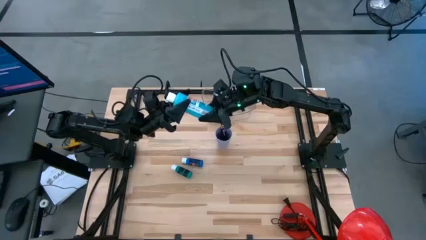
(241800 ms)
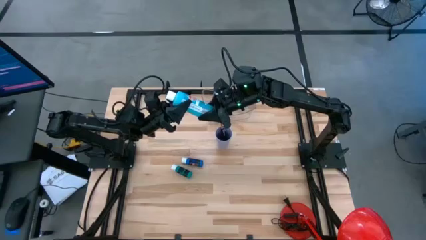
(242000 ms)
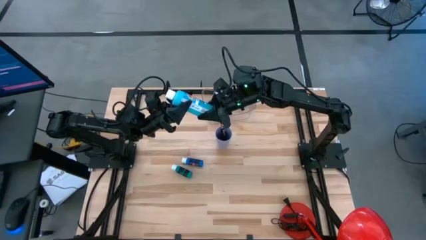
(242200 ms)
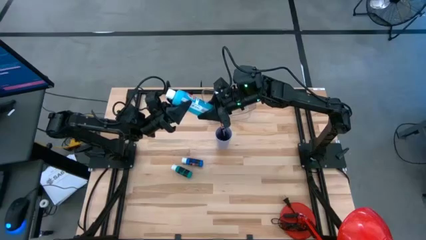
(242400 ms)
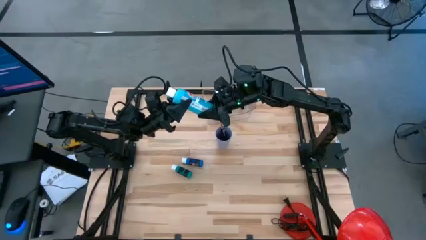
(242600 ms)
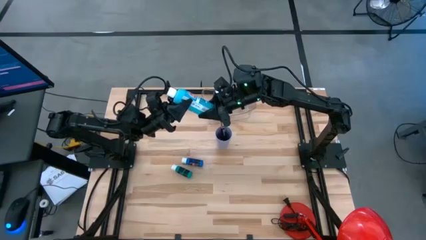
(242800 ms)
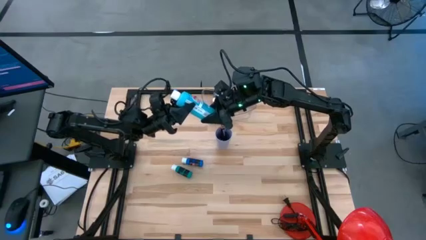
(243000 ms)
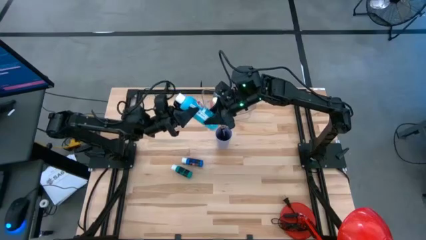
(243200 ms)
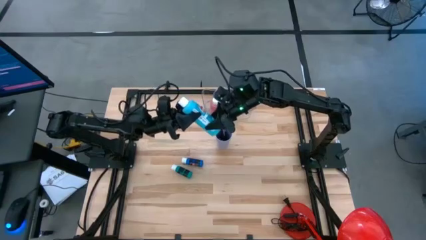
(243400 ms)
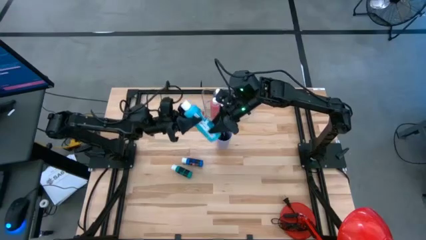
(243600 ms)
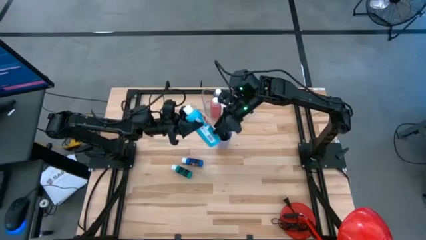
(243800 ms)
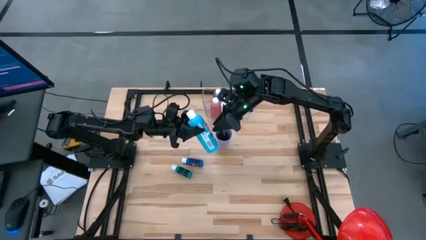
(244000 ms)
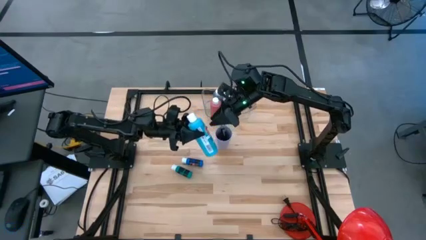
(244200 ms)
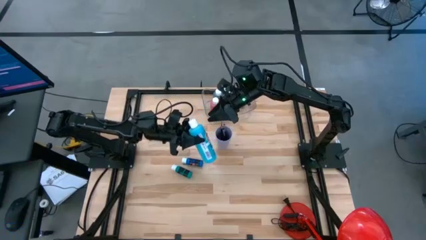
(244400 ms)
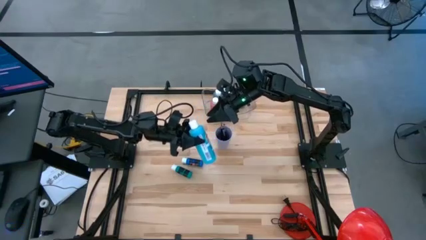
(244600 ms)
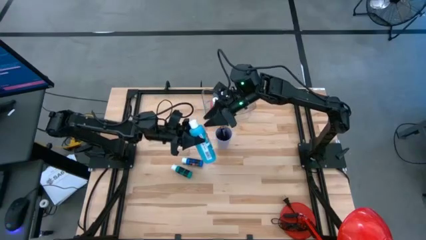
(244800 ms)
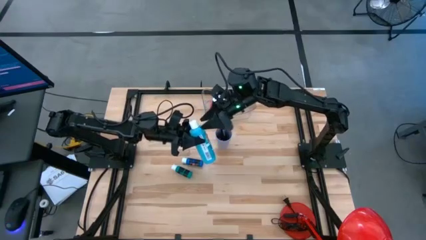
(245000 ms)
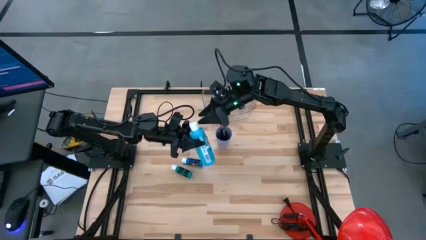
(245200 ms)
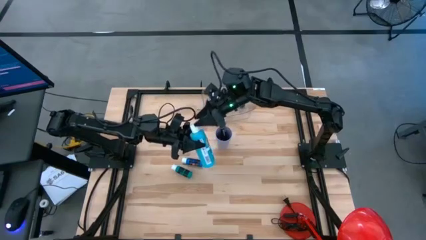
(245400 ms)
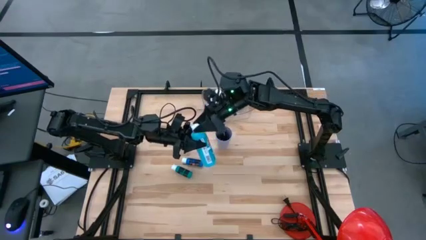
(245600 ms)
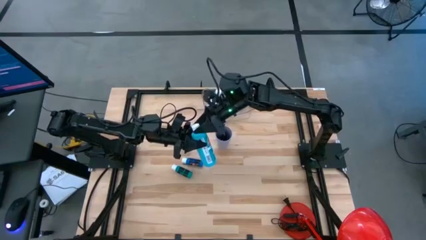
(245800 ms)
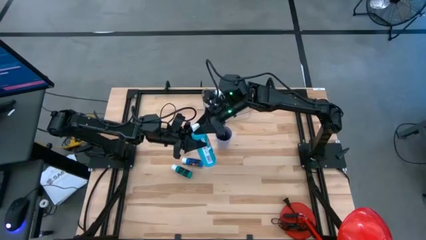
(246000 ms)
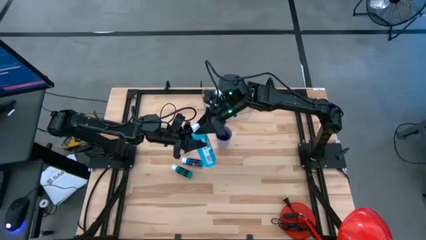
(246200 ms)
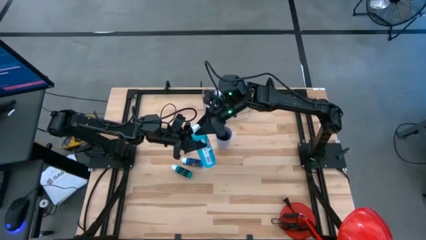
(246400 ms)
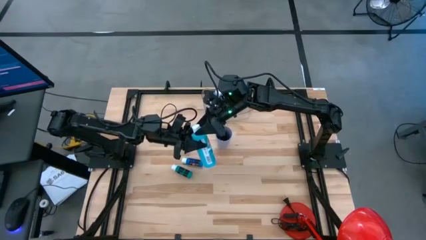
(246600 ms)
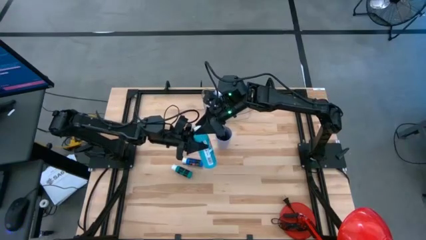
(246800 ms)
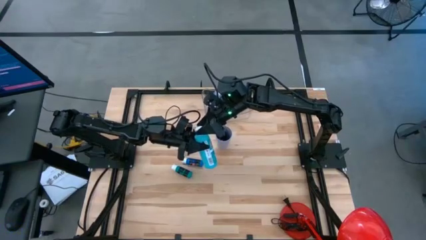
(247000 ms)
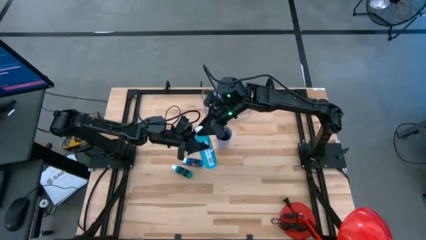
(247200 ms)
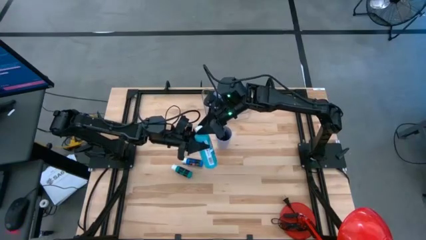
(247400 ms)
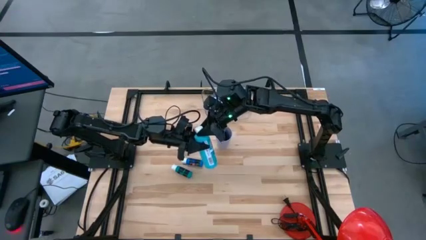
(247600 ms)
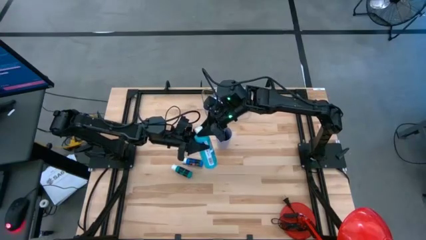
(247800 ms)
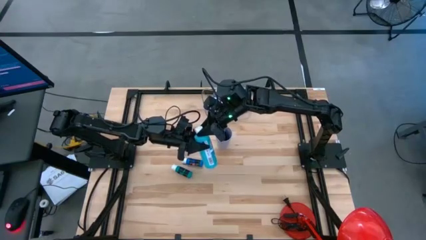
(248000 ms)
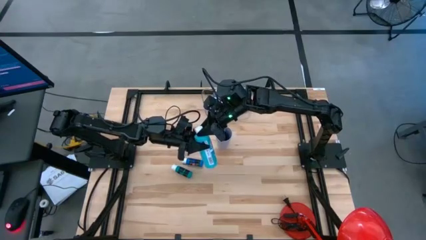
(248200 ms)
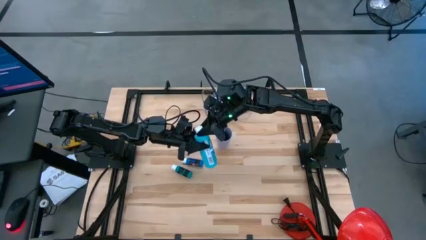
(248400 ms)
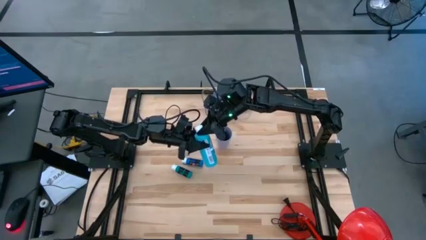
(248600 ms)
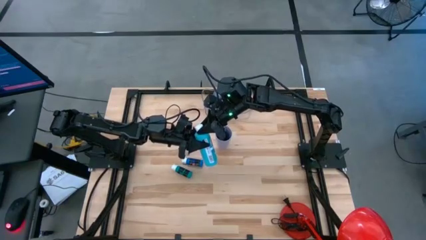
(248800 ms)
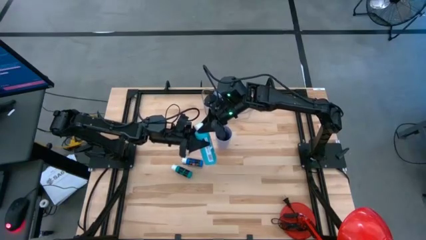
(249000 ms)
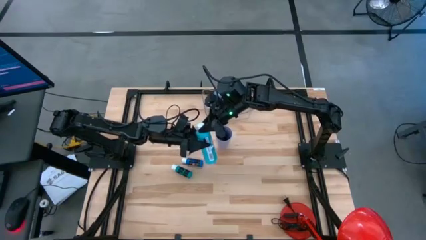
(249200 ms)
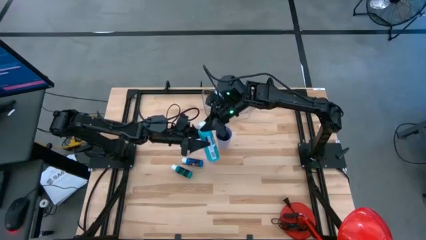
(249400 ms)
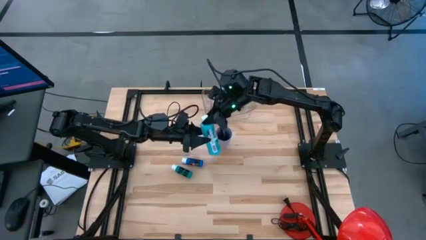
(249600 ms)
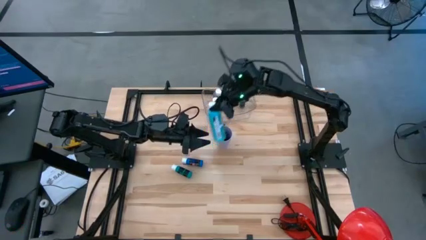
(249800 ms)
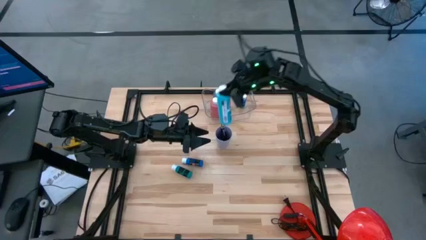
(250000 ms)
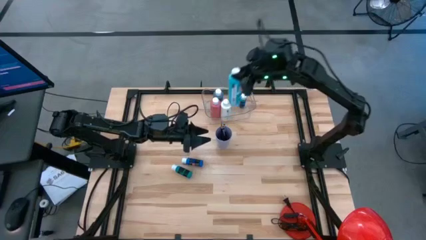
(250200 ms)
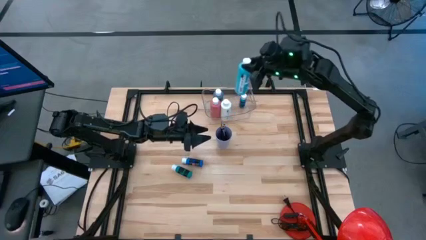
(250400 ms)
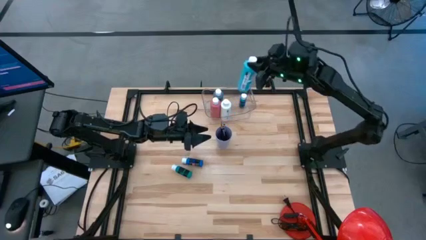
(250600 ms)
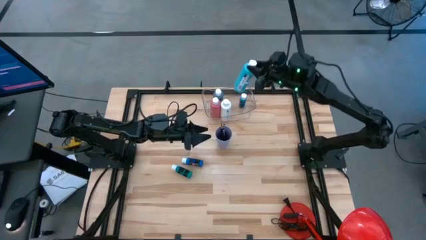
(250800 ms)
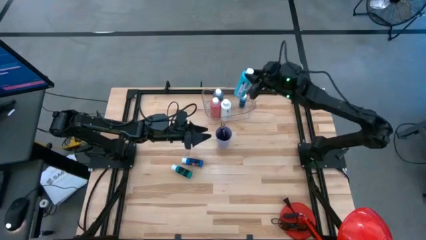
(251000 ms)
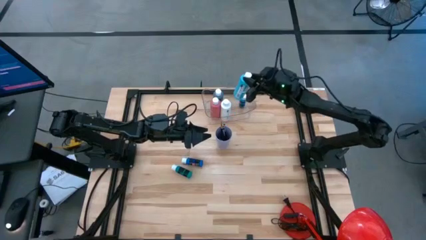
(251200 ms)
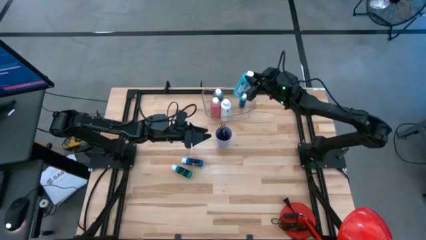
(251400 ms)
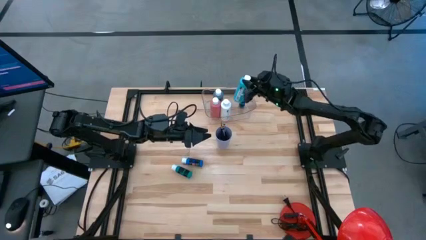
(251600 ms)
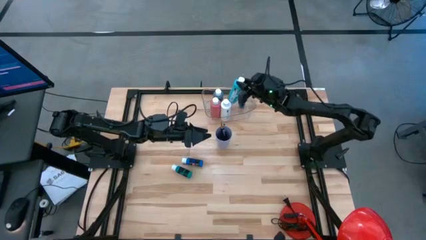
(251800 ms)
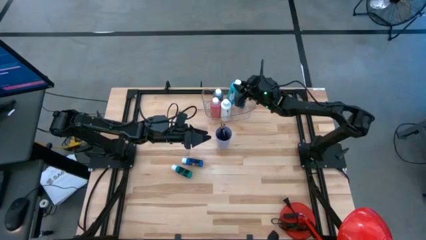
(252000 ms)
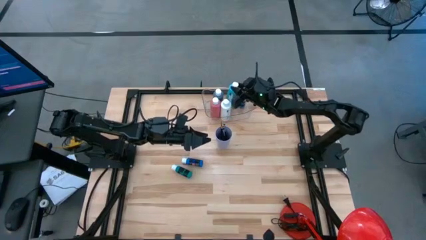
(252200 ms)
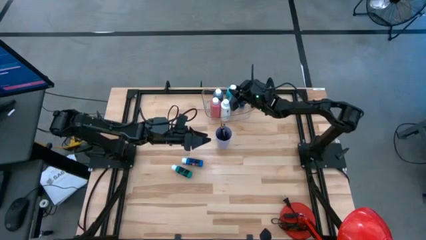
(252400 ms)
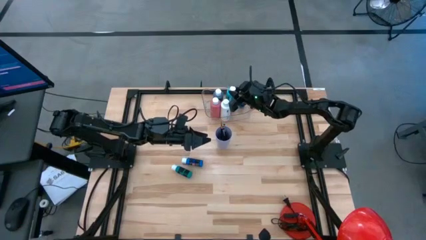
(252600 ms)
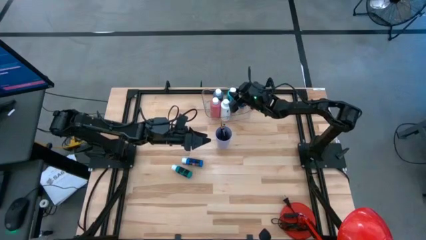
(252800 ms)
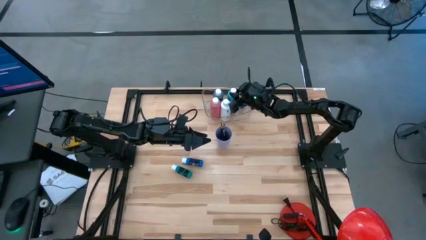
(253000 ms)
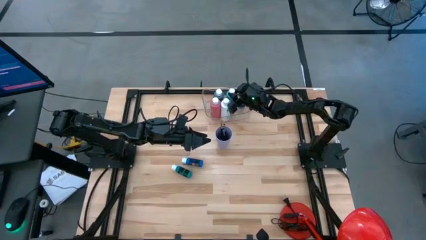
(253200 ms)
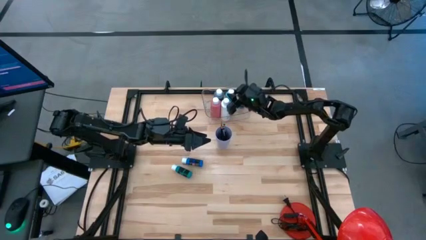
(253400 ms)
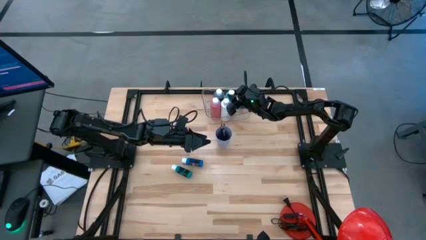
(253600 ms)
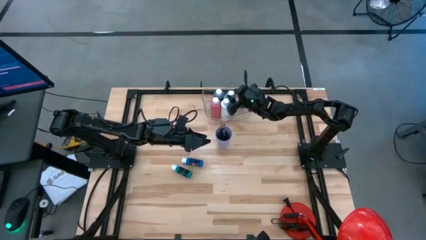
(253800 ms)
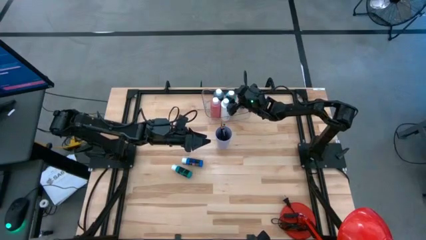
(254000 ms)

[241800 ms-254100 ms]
Task: Pick & Place Paint Supplies
Put the light blue paint bottle into the transparent bin

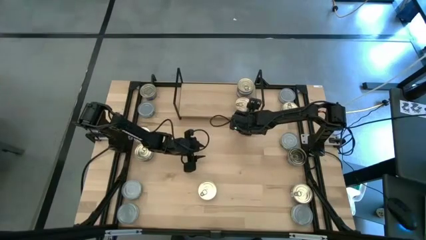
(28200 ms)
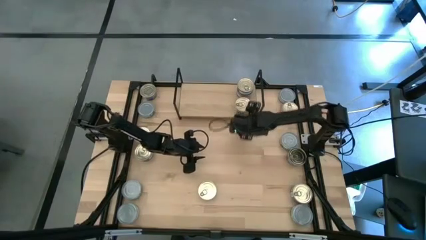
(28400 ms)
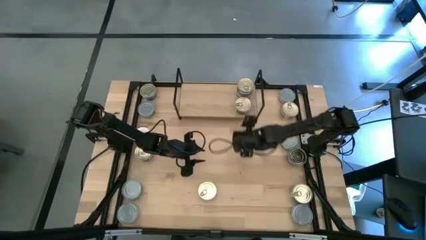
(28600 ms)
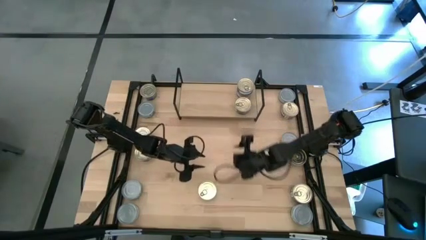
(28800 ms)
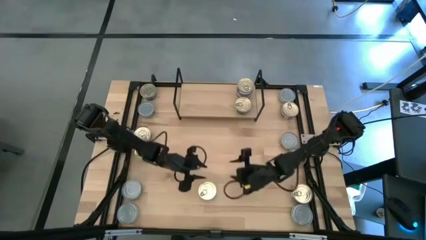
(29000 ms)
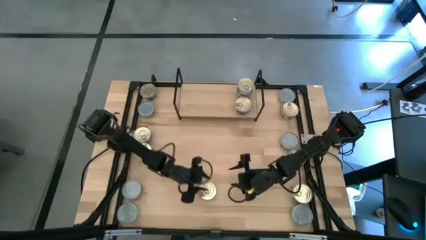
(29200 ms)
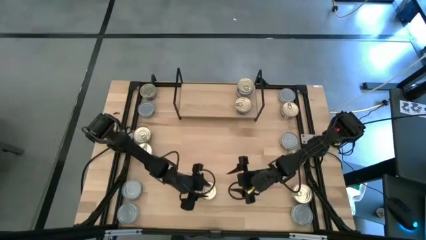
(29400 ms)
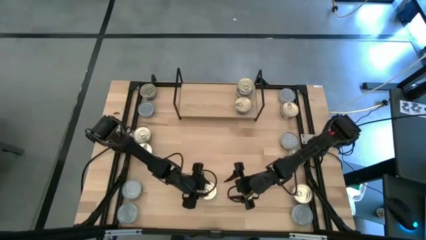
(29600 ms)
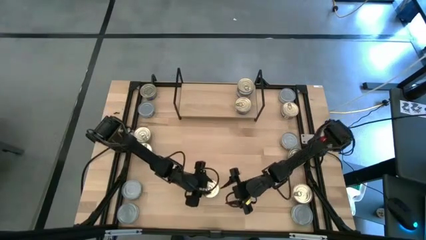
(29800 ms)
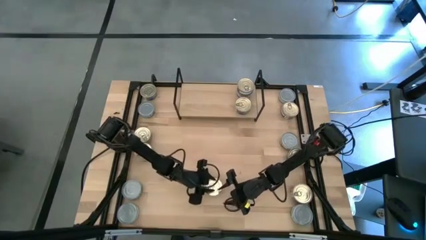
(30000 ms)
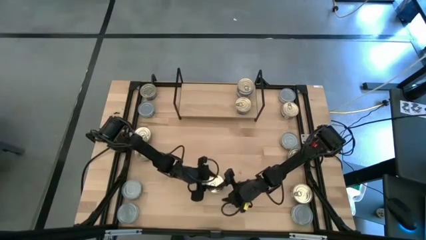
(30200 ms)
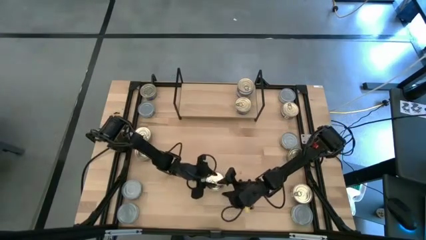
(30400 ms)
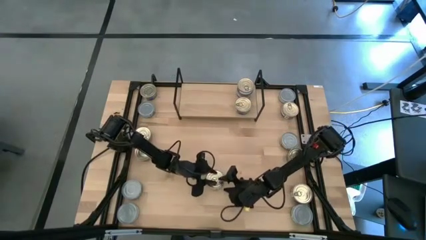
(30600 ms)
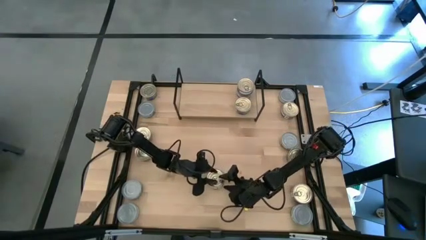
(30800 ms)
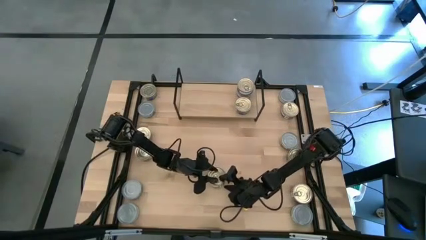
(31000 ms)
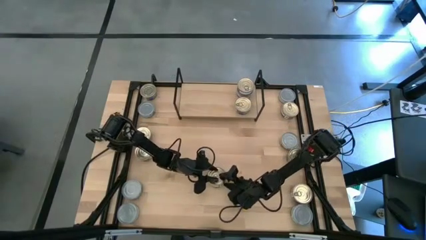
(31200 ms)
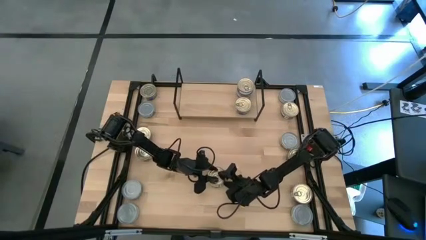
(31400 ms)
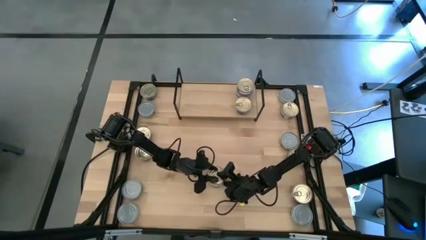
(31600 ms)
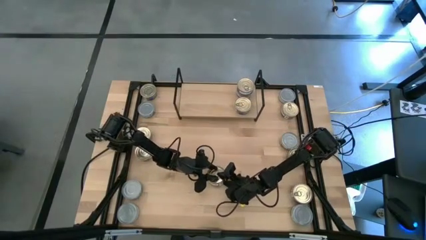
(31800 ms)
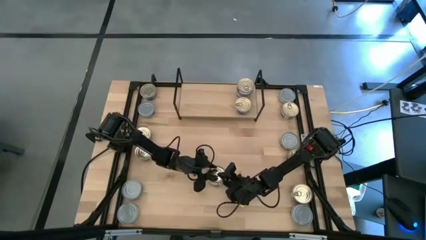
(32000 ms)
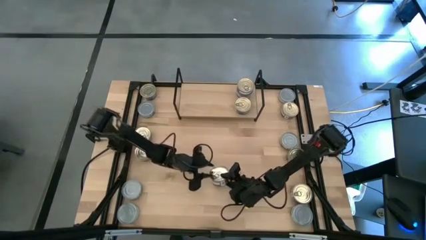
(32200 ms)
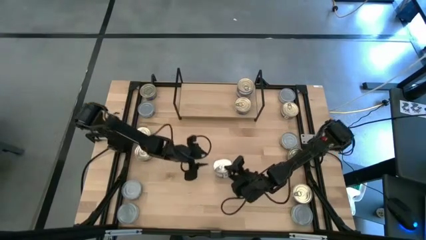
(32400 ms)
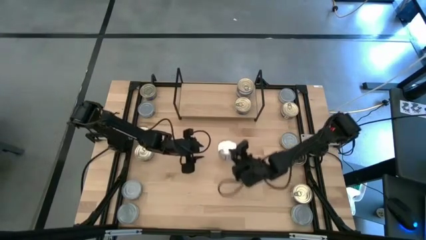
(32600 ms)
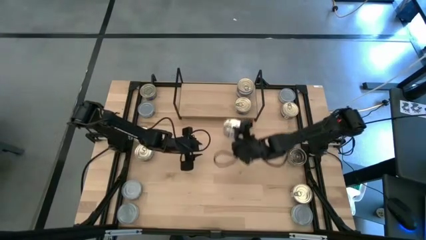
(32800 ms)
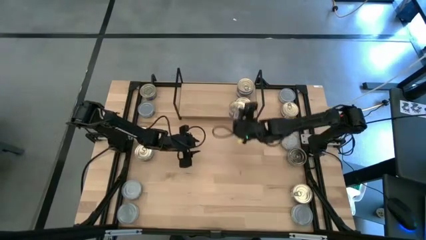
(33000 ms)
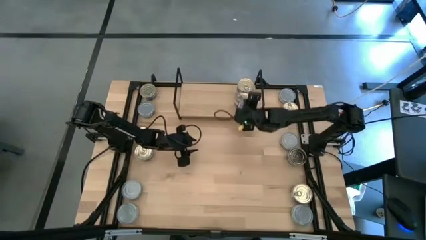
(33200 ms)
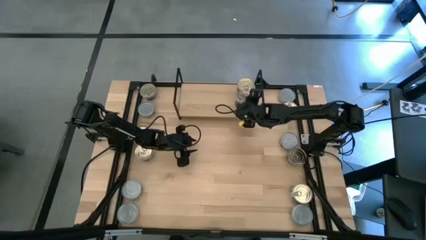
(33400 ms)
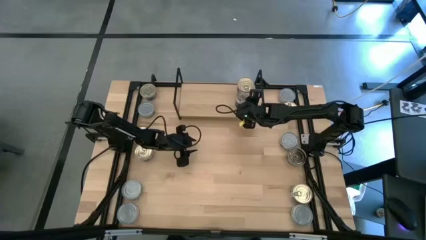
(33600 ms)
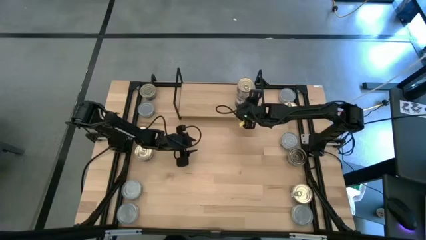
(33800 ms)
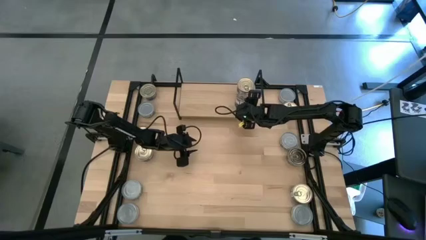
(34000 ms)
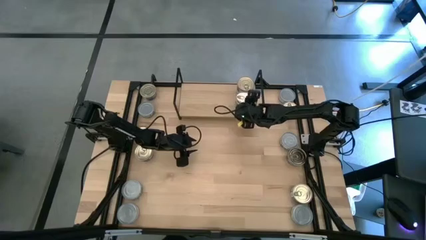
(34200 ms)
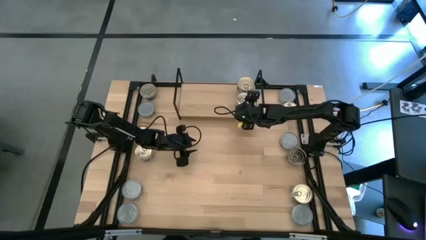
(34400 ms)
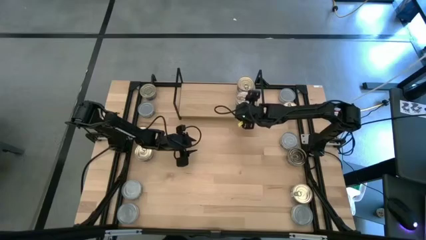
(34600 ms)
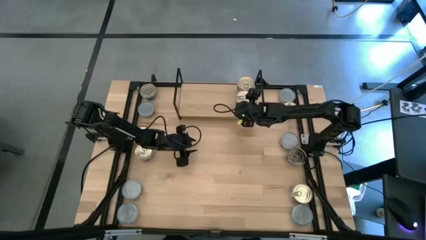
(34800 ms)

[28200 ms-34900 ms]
Task: Stack canned seafood by type on shelf
Stack the blue and pink tuna can on top of the blue and pink tuna can on the shelf
